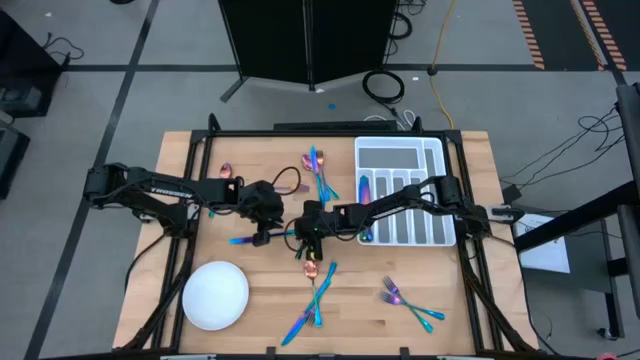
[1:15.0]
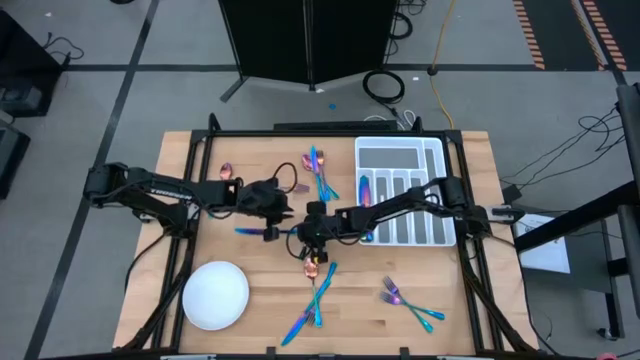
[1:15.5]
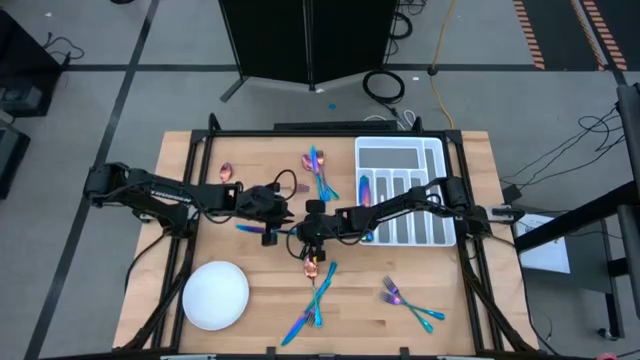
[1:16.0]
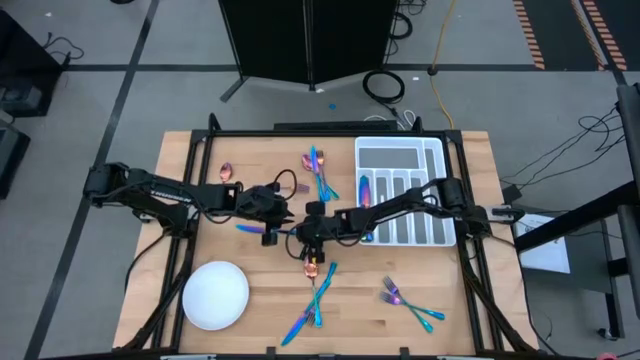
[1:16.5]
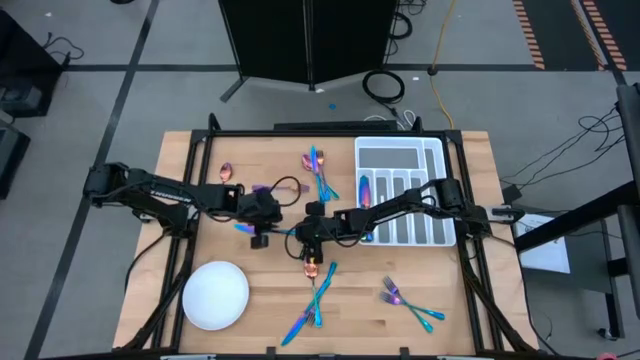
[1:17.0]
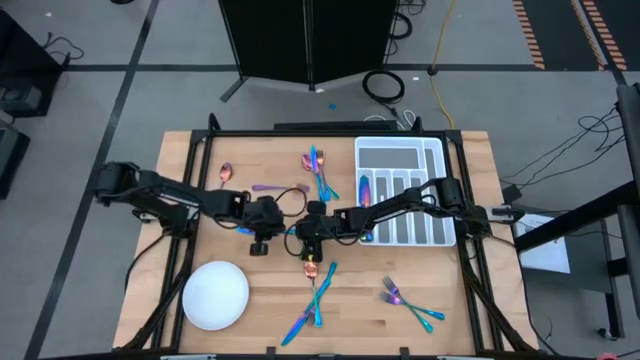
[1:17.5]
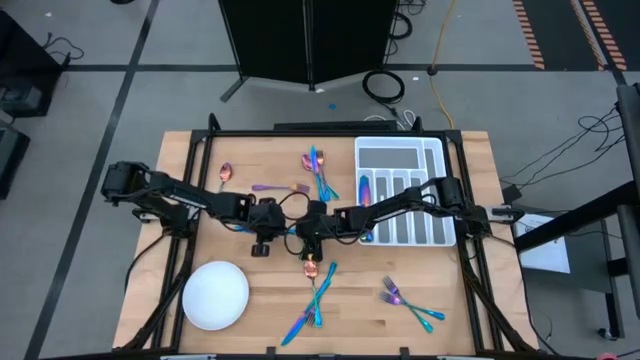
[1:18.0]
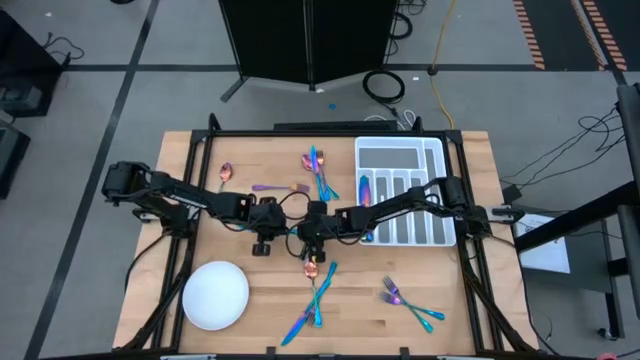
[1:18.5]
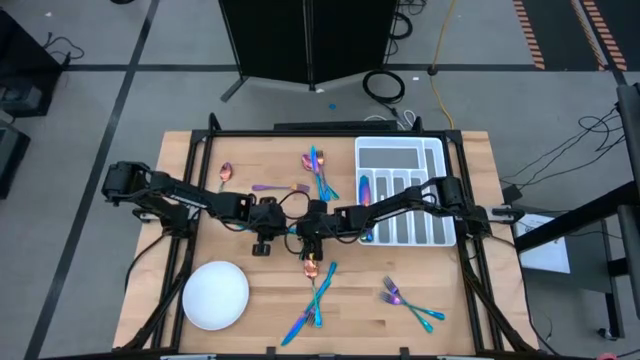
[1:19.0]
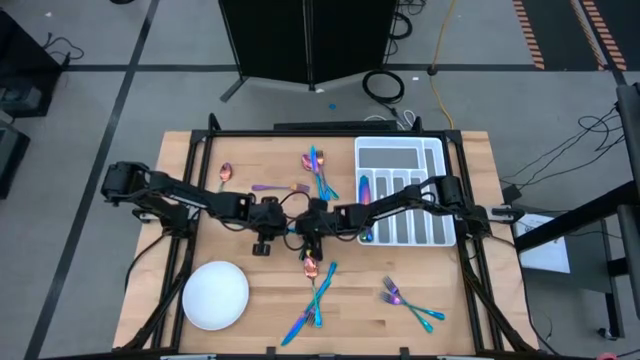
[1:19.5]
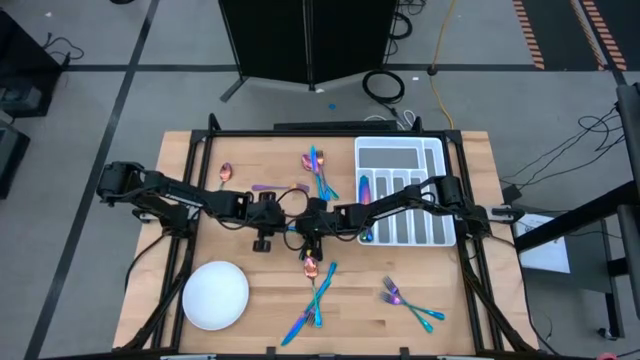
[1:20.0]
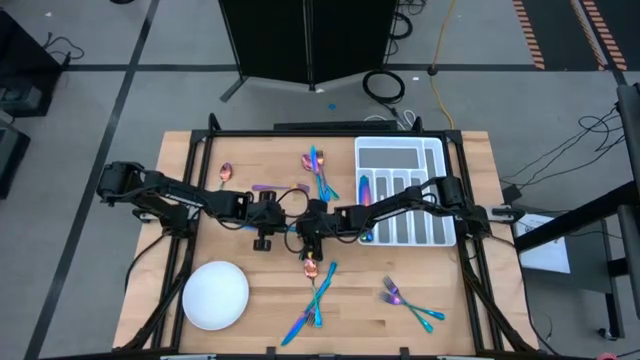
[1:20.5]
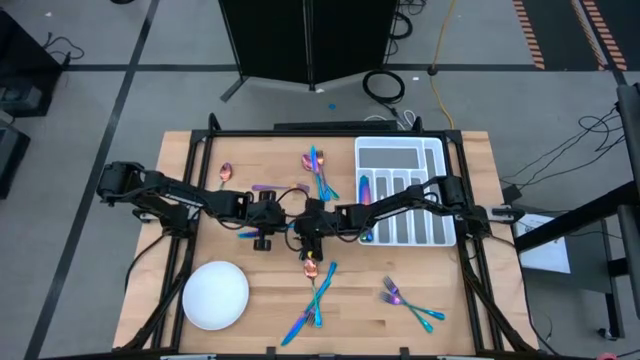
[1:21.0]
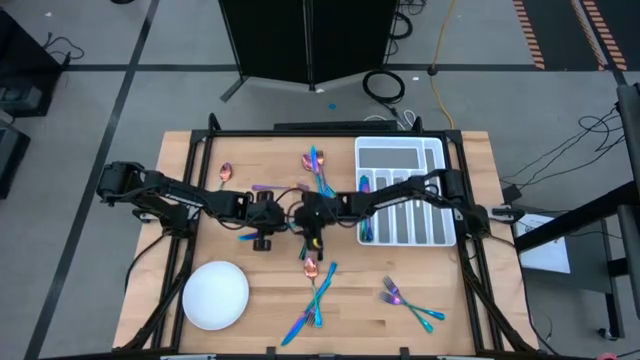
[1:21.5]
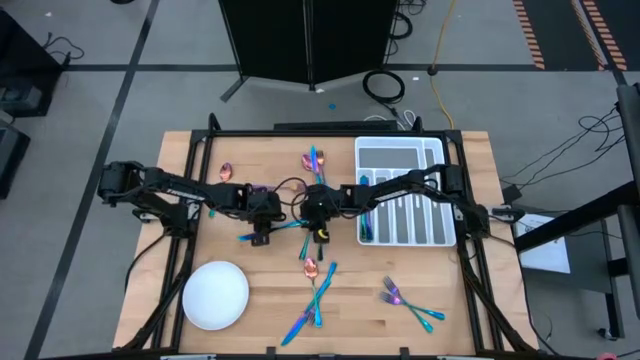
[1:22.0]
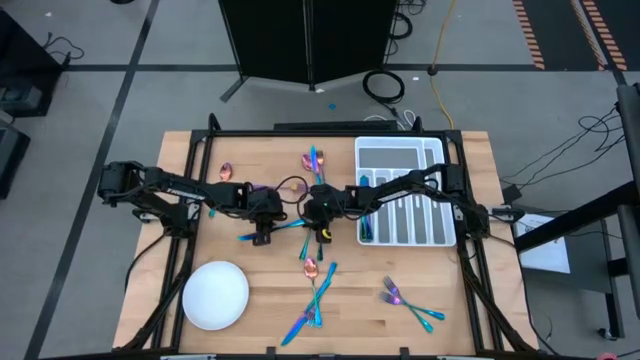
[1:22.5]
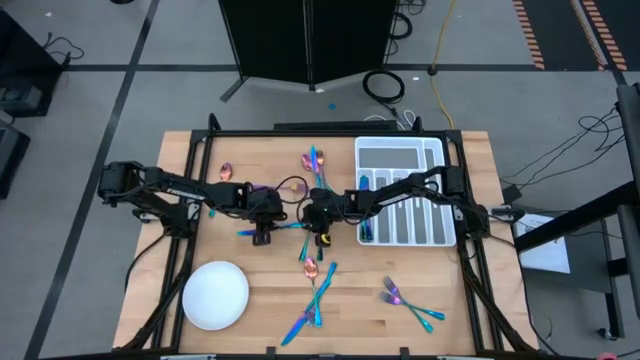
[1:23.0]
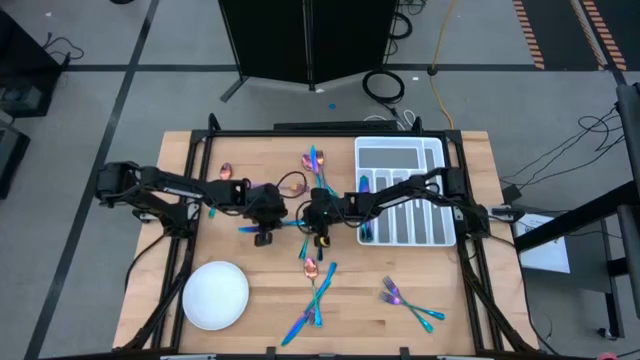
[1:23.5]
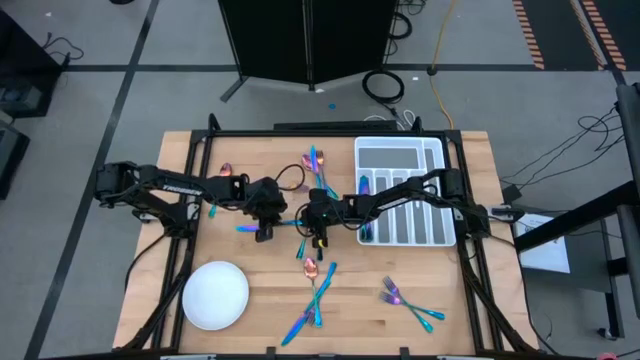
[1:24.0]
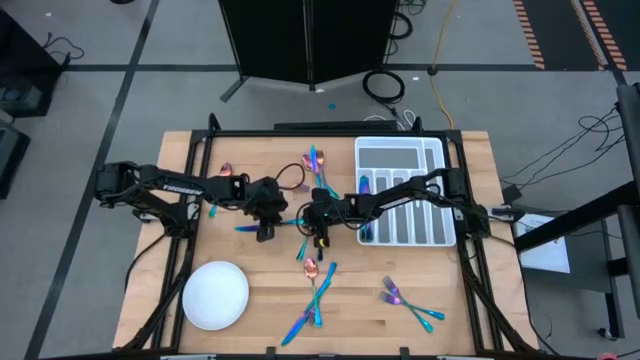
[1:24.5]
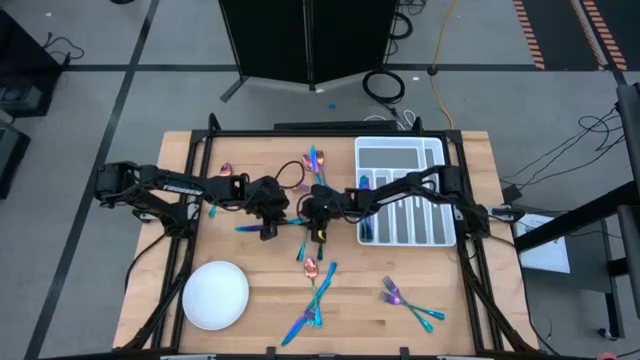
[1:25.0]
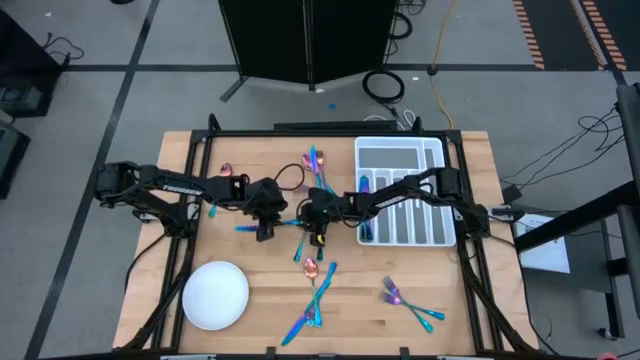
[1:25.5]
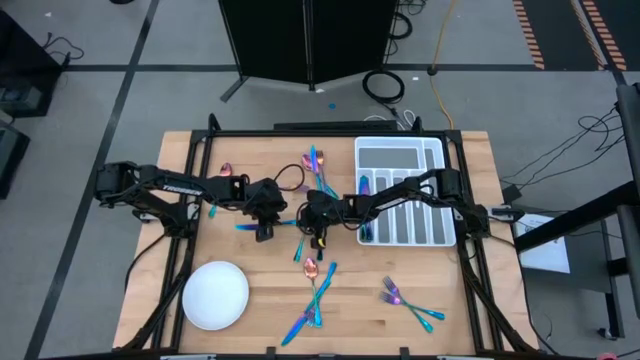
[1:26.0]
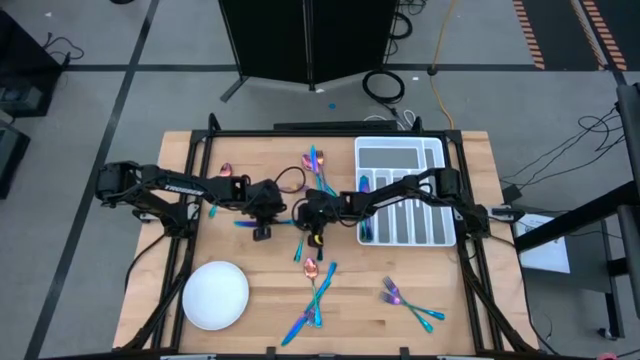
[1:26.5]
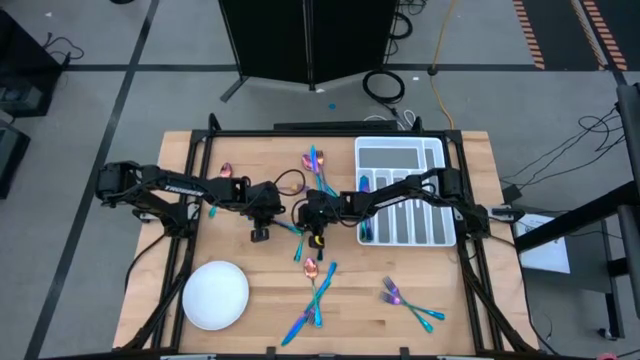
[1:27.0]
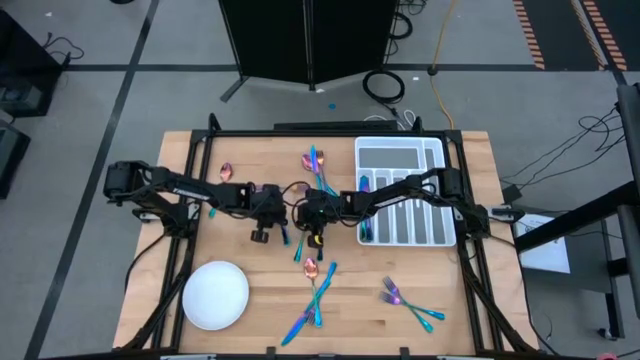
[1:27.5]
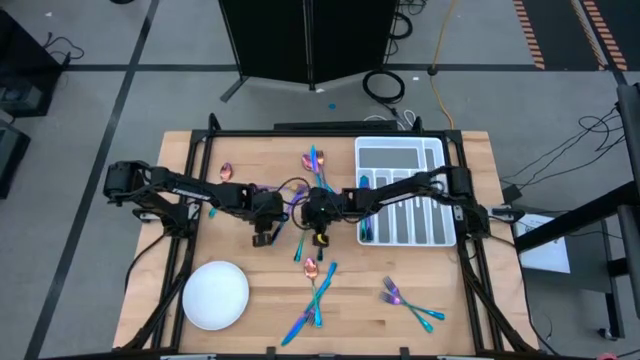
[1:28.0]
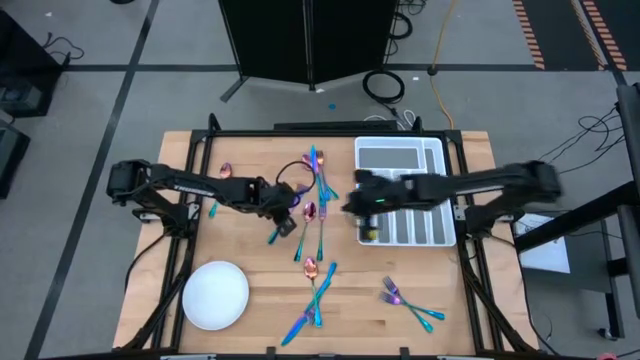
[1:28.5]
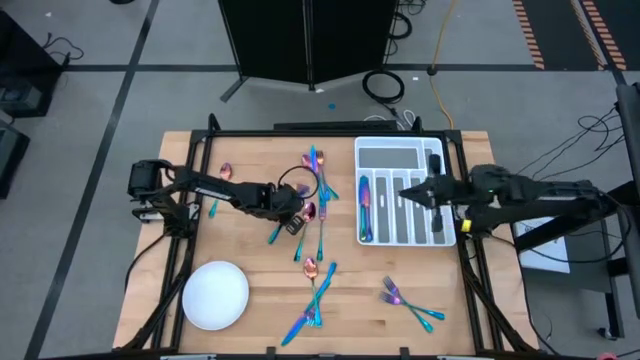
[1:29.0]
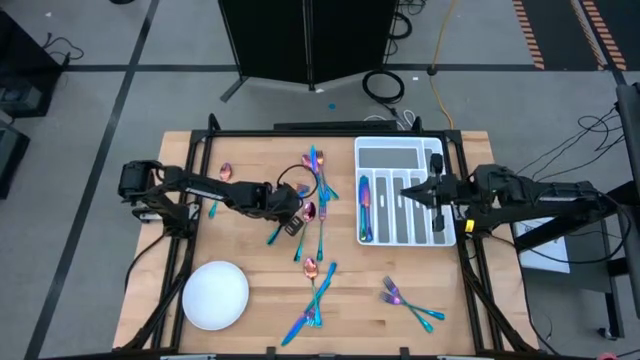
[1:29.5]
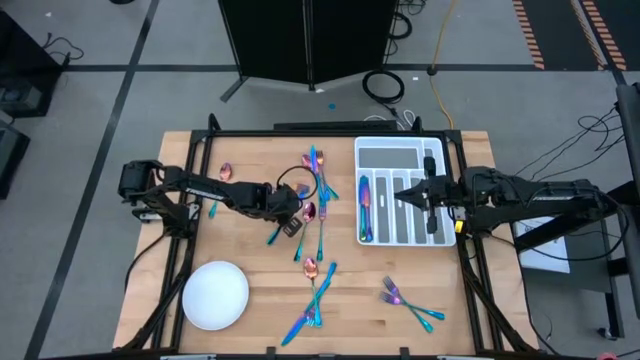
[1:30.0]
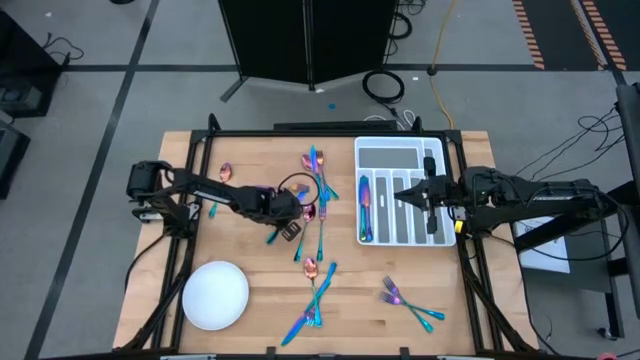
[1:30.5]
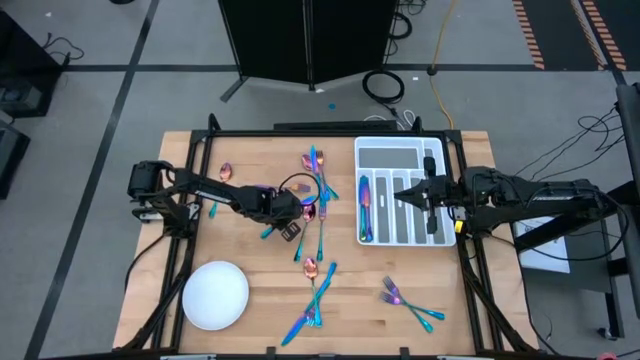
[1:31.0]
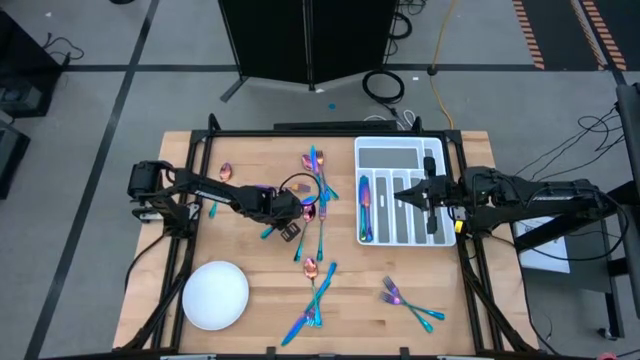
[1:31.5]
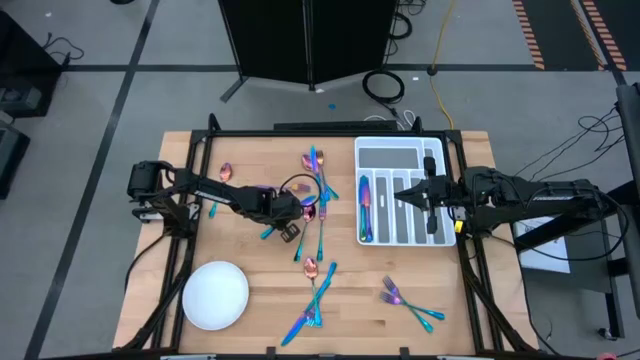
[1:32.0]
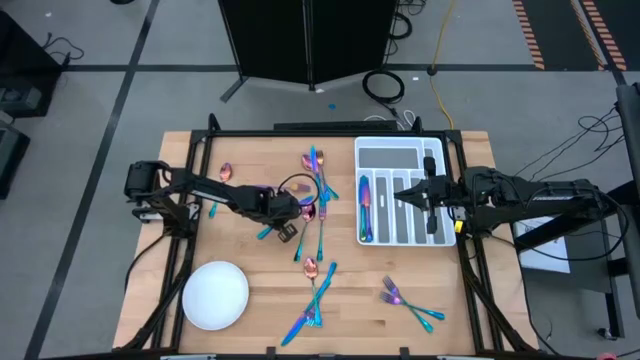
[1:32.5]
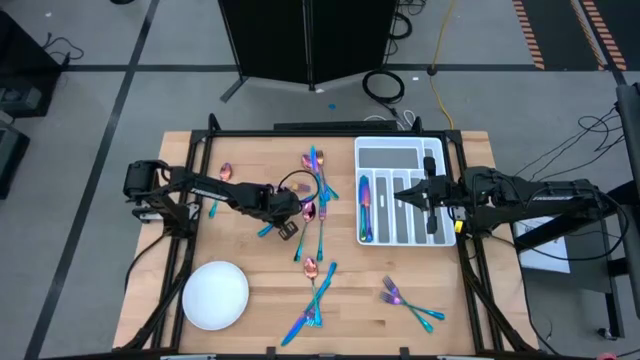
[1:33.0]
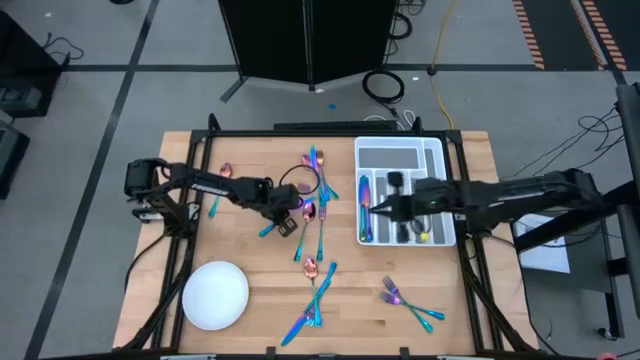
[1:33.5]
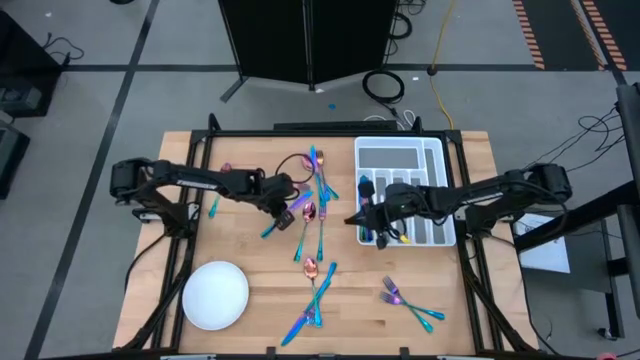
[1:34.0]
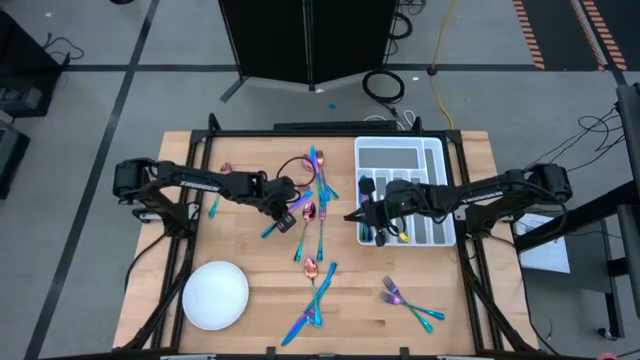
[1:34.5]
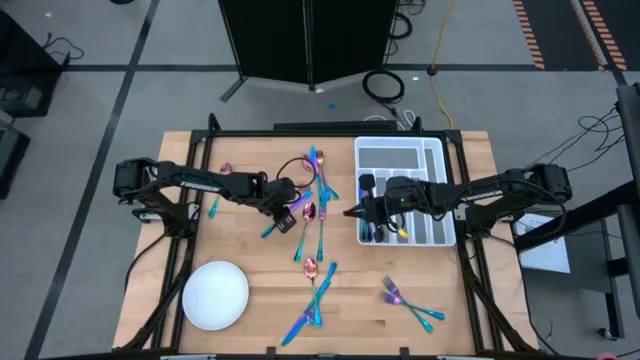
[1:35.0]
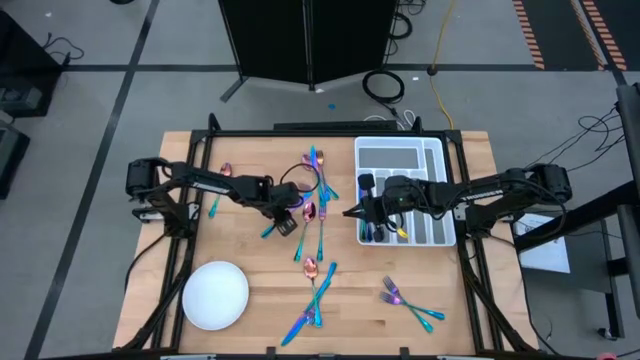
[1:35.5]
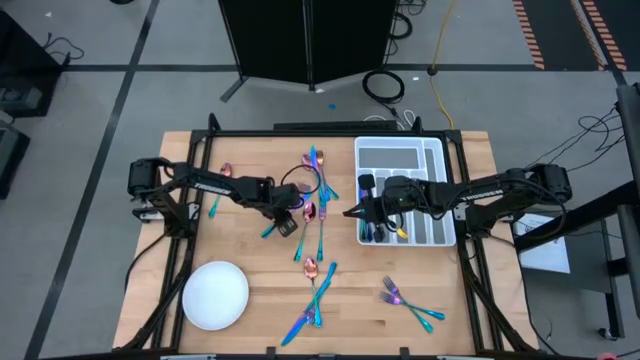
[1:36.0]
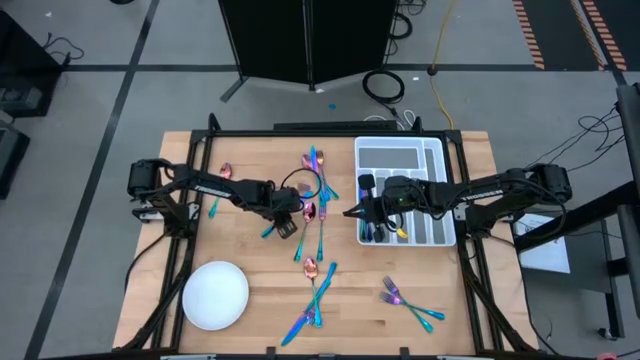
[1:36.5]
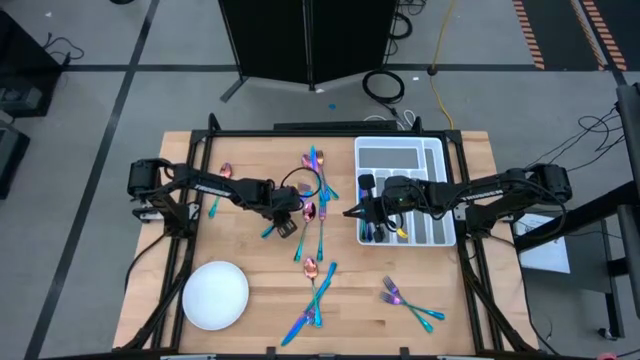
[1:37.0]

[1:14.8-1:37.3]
Task: Sort silverware
Put the blue knife into the utensil organizer
